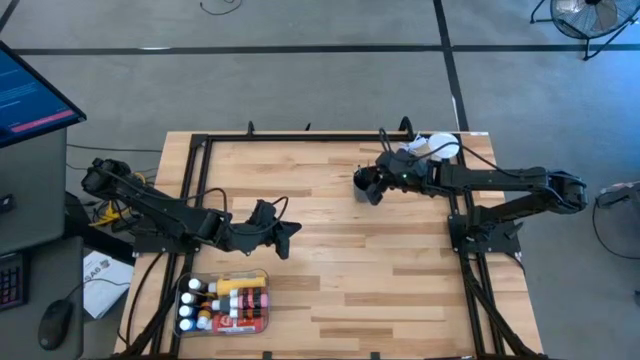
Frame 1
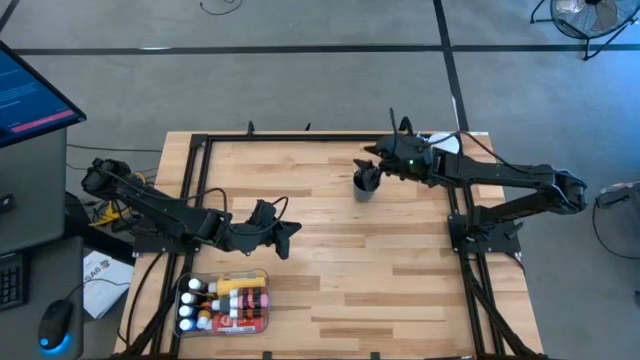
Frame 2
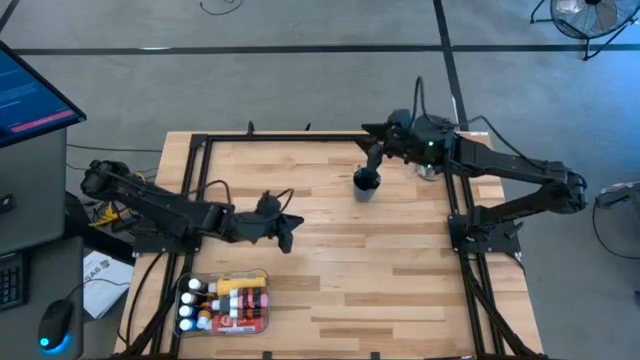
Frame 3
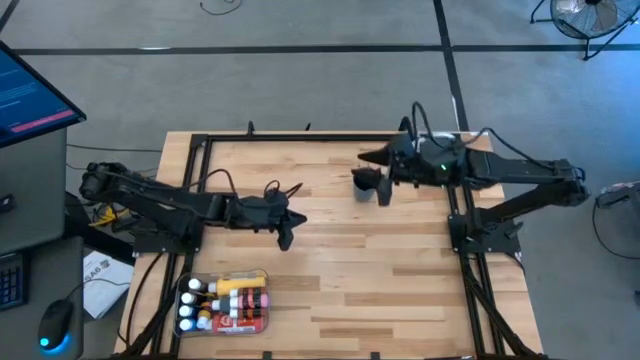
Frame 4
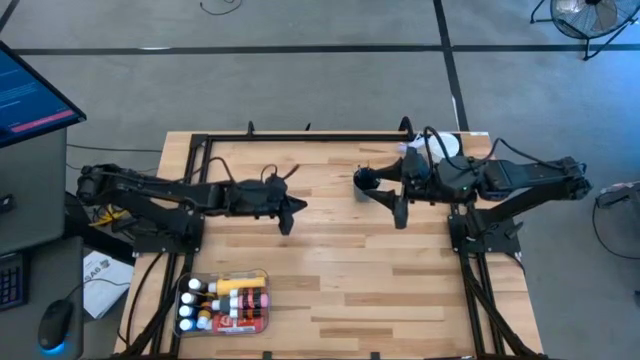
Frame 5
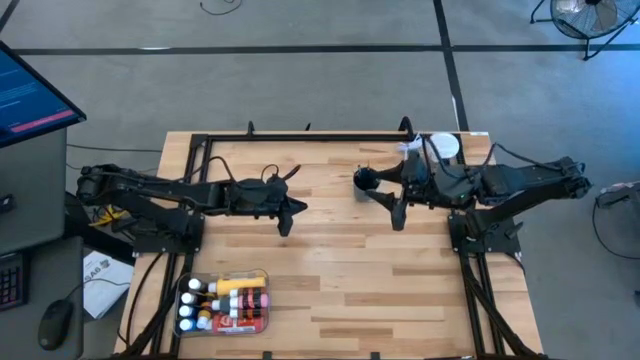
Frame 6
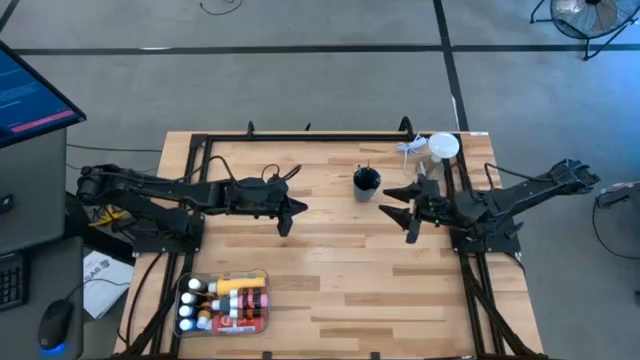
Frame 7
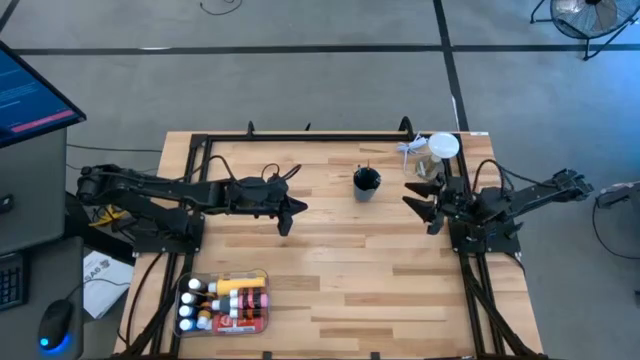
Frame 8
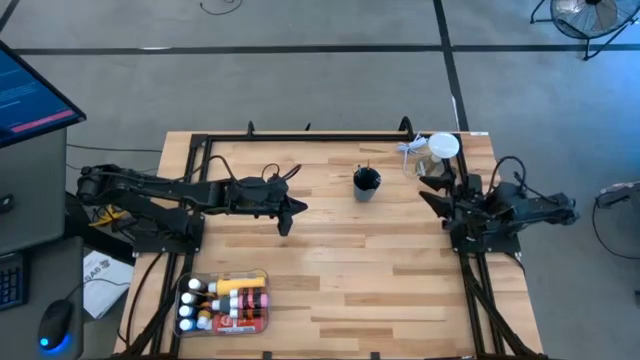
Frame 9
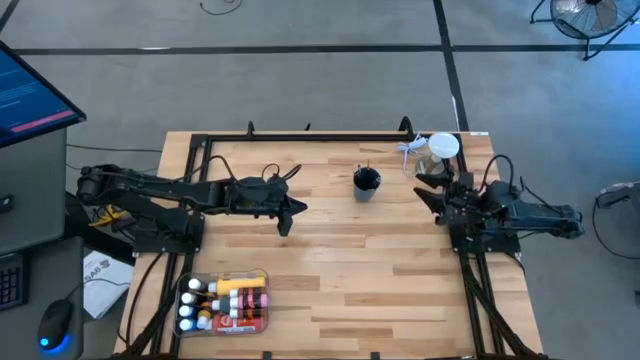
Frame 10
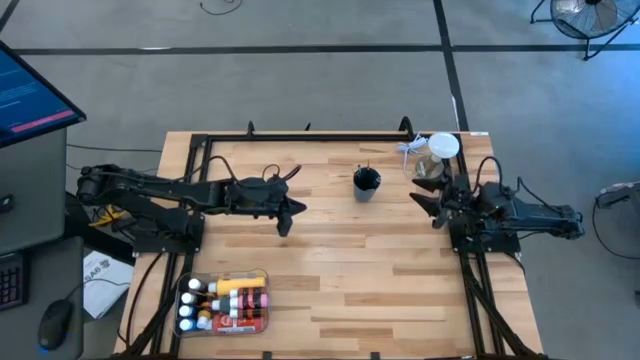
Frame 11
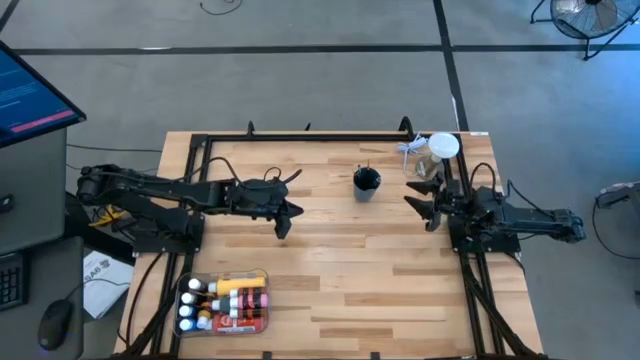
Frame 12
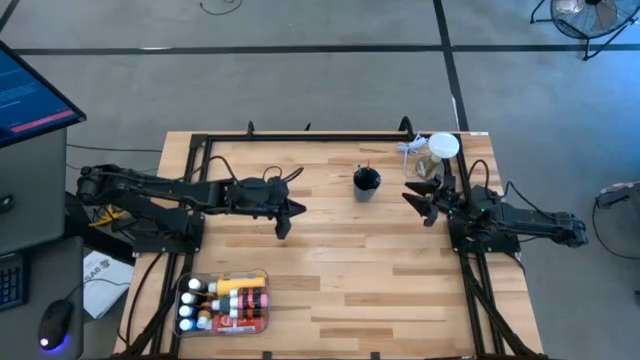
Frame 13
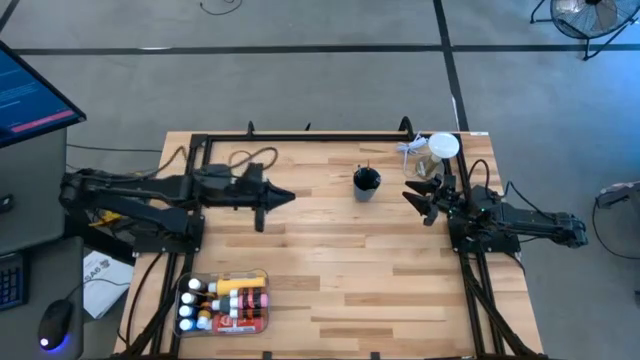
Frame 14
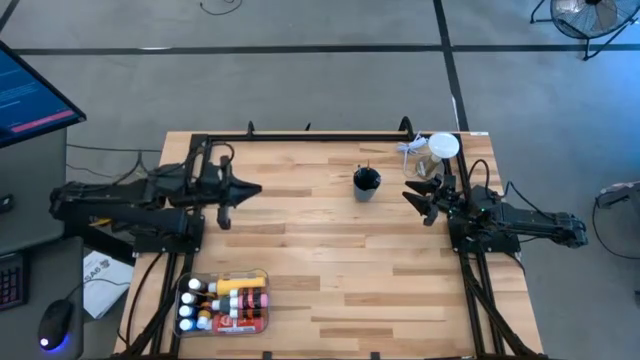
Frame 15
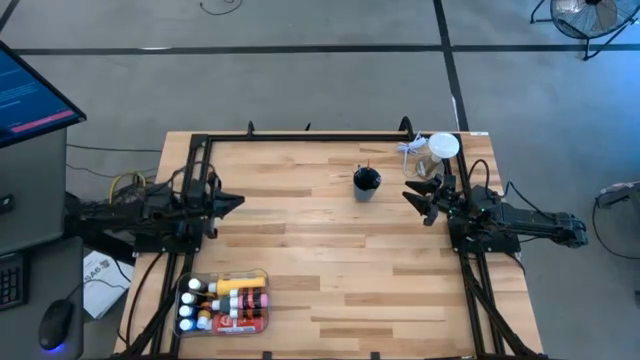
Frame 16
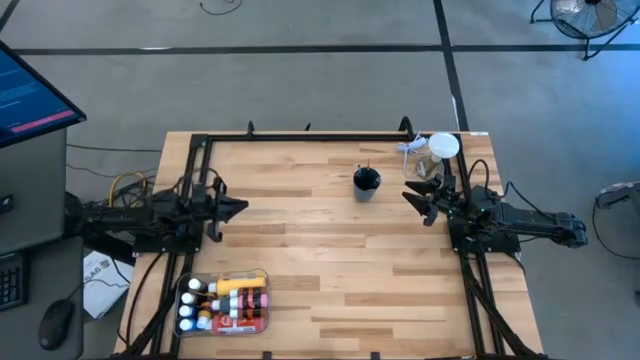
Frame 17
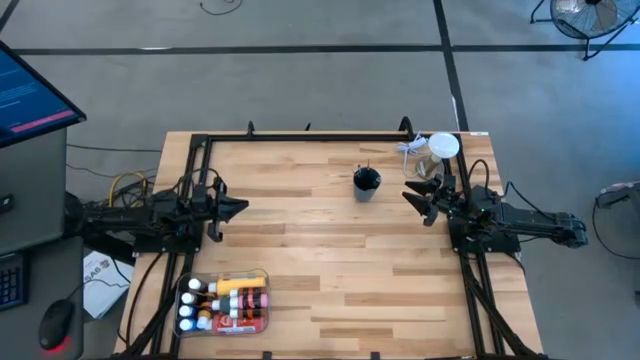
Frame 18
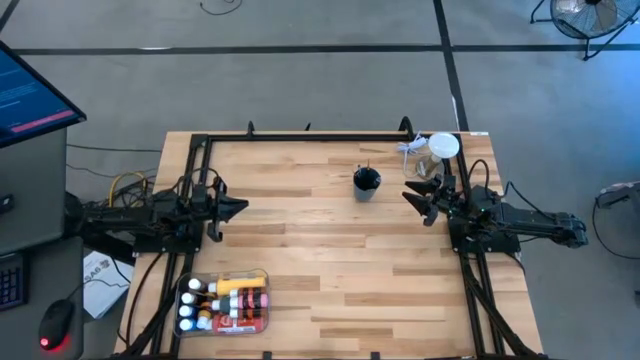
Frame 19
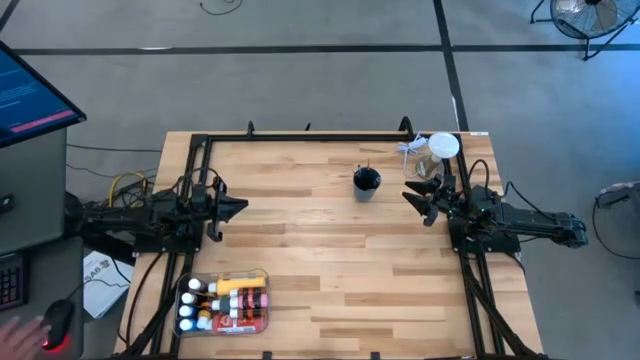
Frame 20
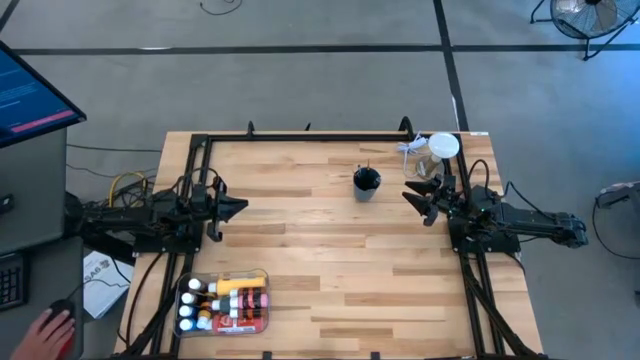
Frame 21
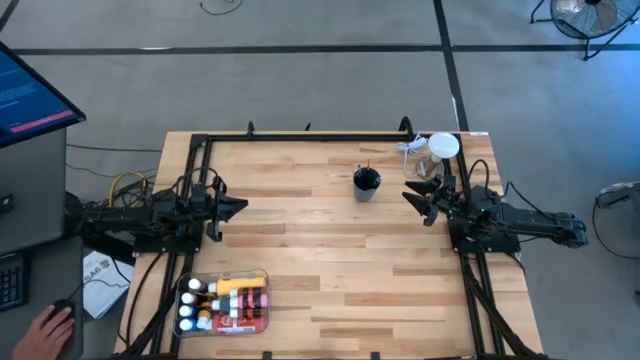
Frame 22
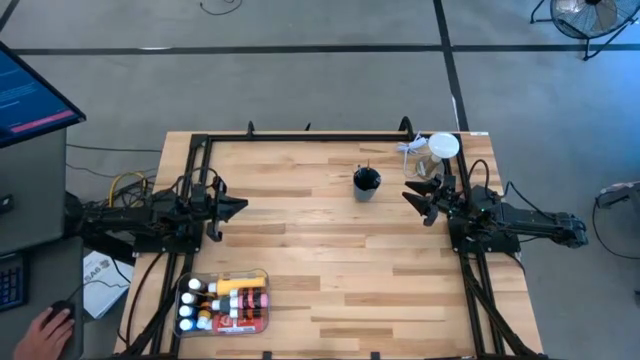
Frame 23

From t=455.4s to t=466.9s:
Task: Pick & Place Paint Supplies
Return to Home Position

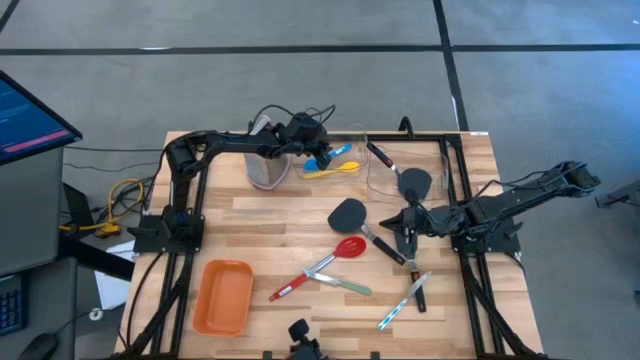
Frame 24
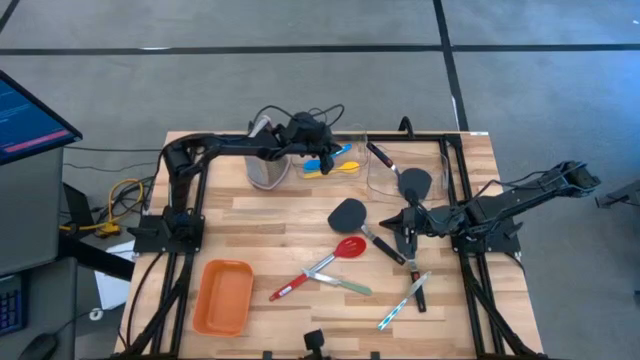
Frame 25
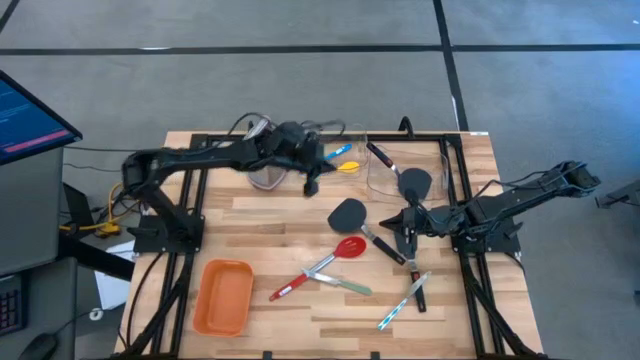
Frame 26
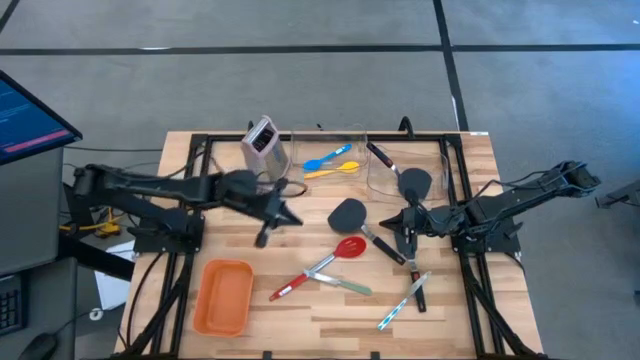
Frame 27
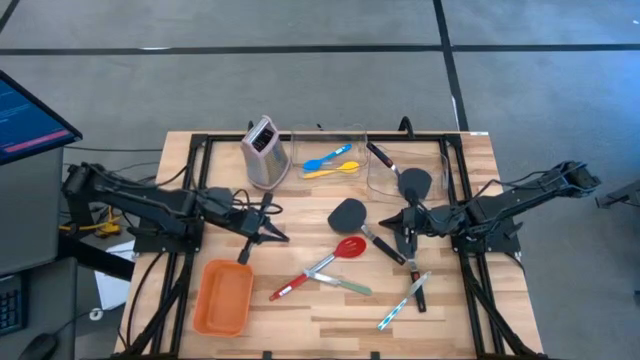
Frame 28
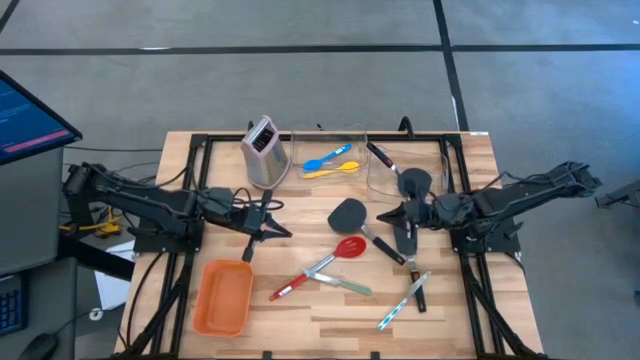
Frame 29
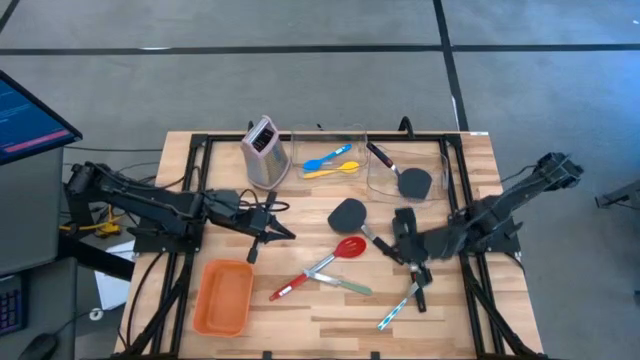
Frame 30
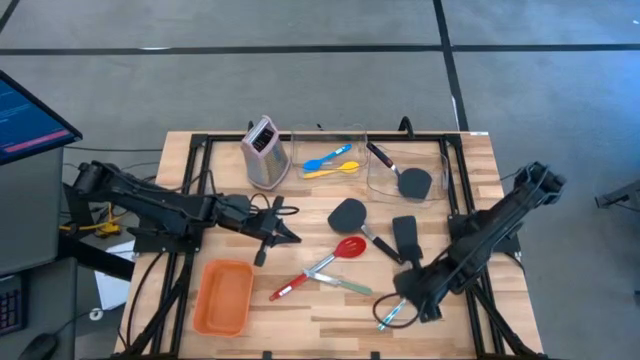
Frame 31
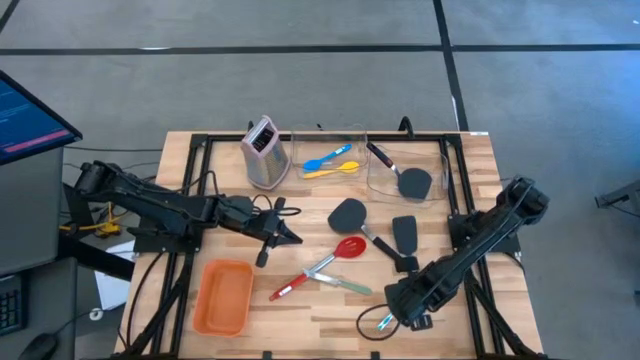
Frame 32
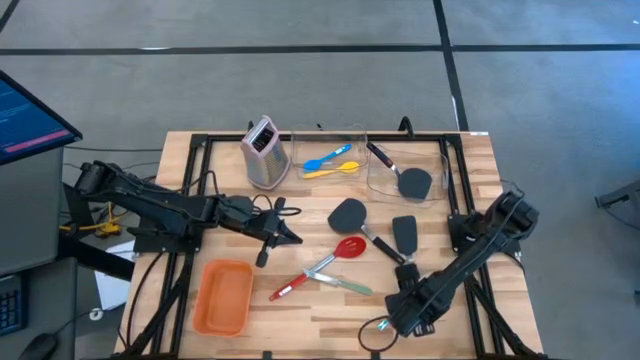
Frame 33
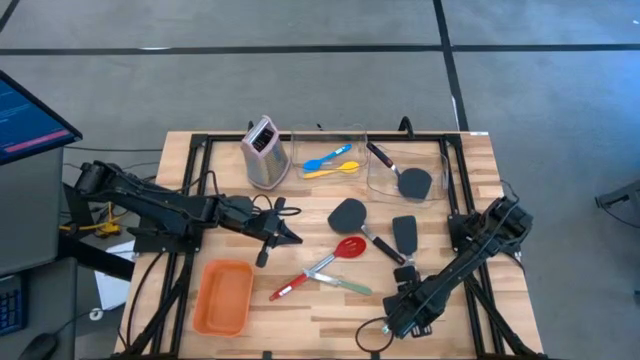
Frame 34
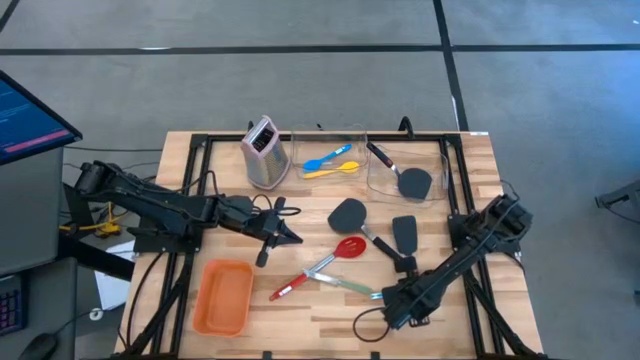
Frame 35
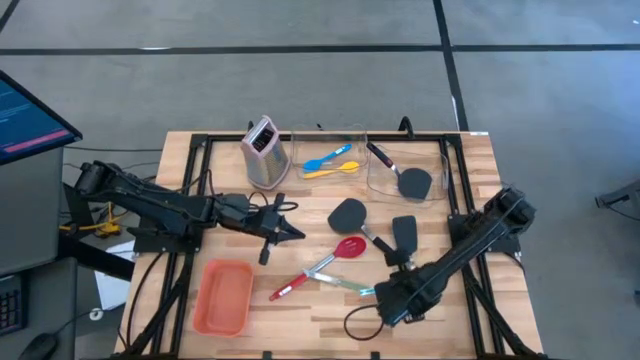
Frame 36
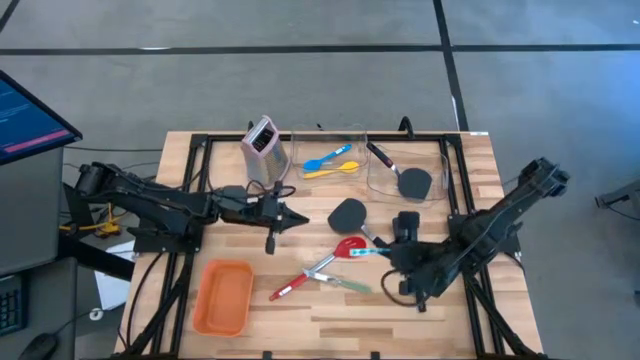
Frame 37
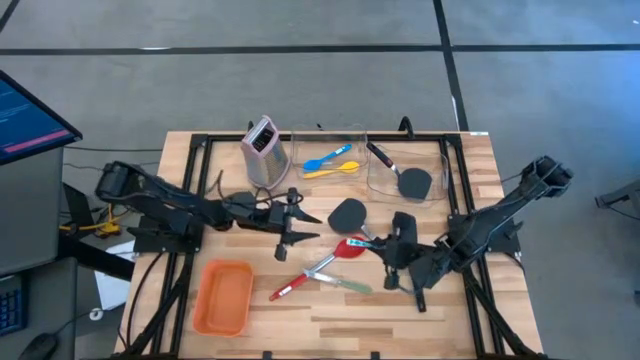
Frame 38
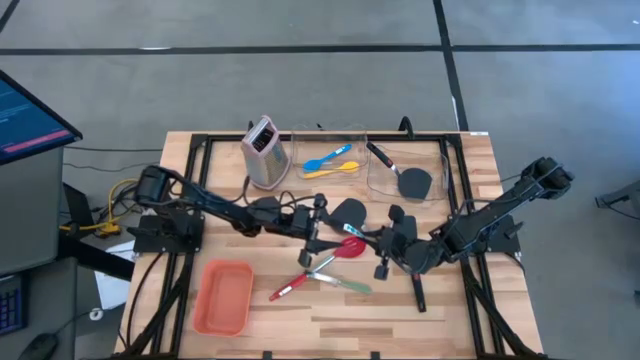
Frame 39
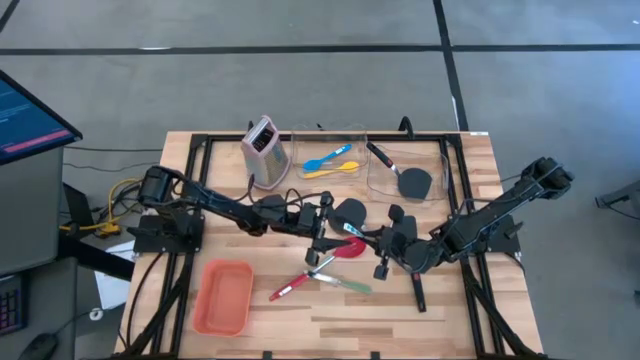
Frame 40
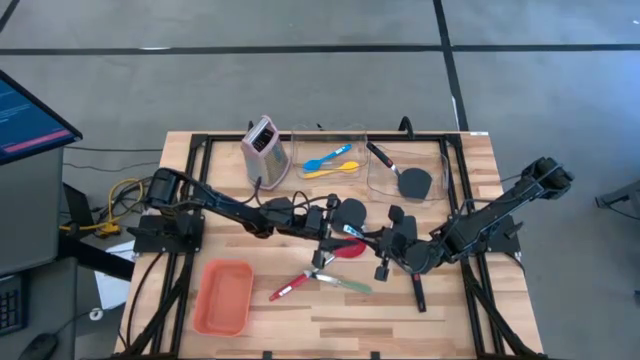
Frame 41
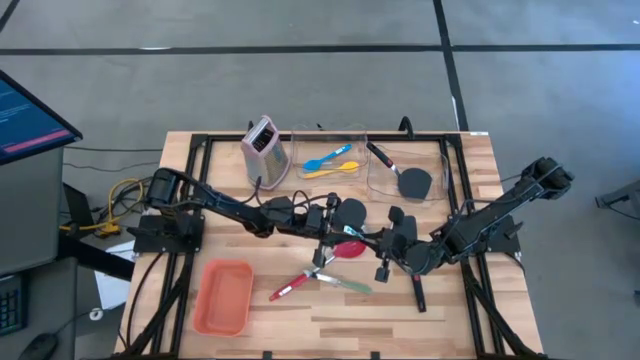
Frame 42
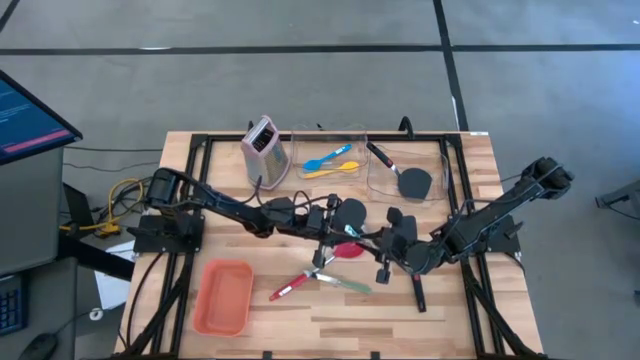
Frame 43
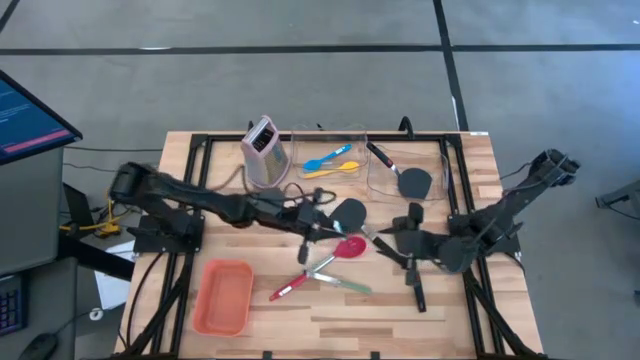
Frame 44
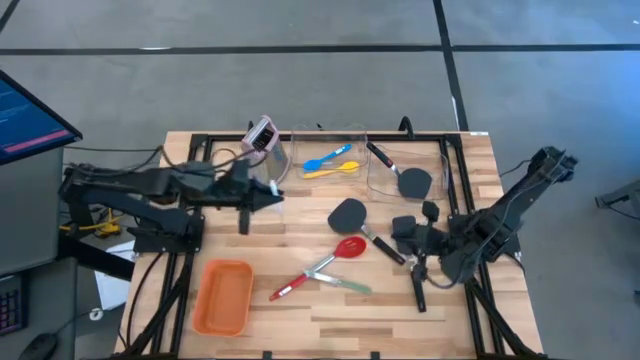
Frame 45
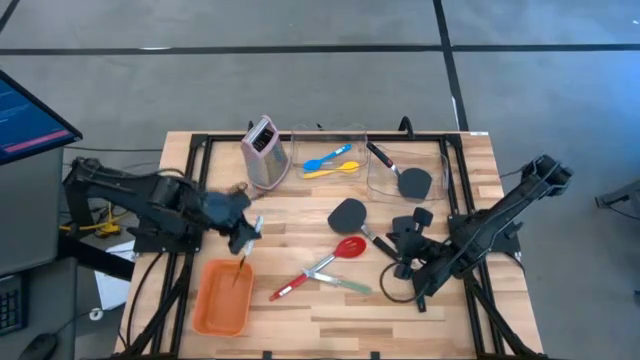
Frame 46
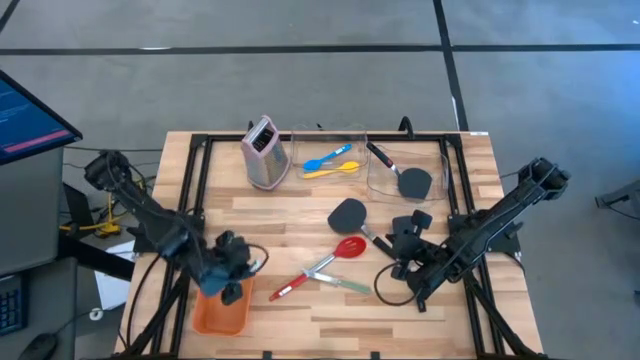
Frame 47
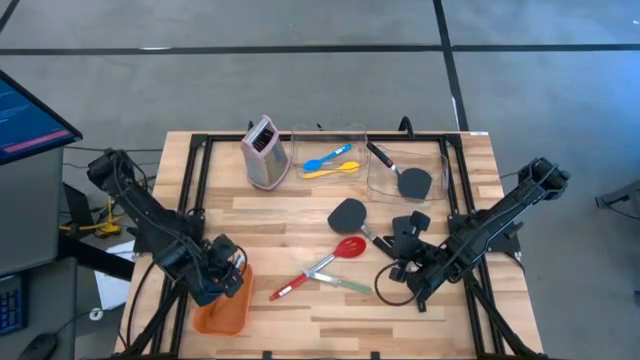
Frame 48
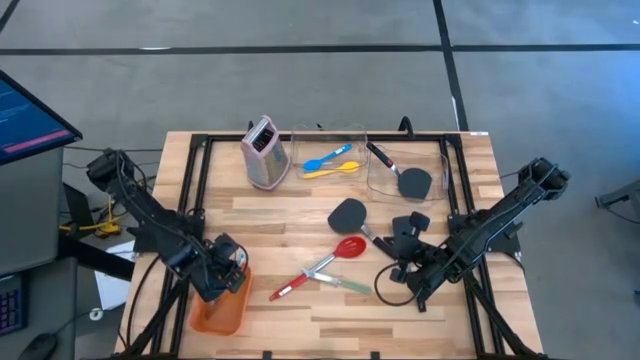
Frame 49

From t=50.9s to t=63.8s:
Task: Pick & Place Kitchen Items
Put the blue knife into the orange bin
